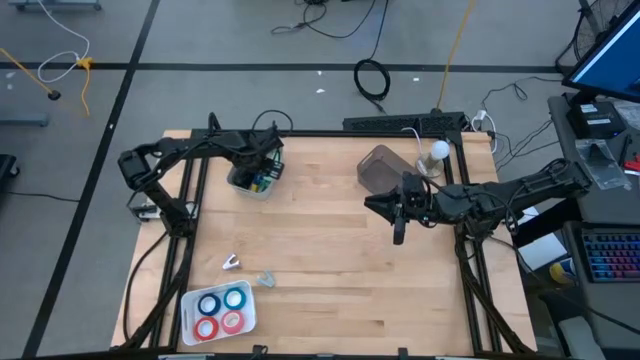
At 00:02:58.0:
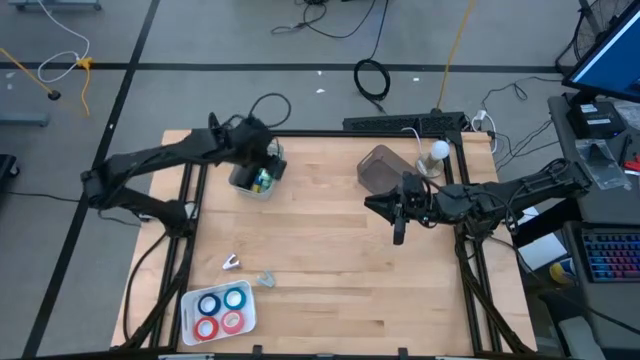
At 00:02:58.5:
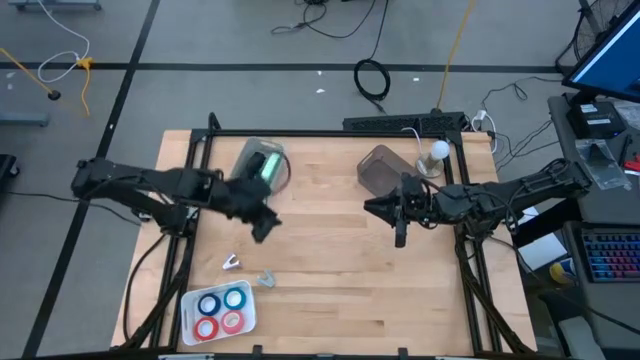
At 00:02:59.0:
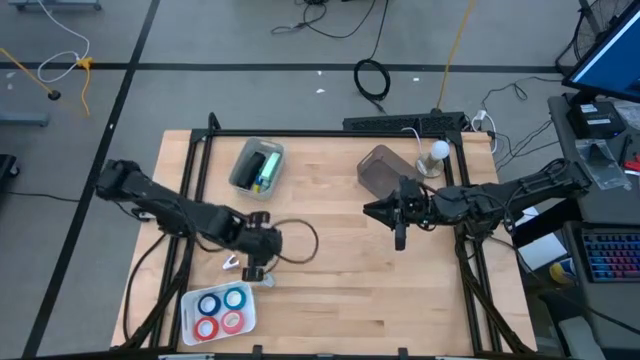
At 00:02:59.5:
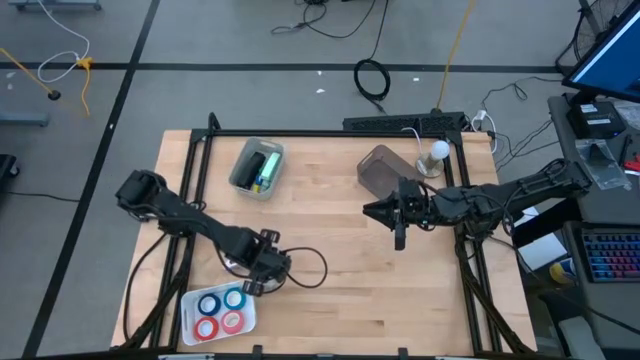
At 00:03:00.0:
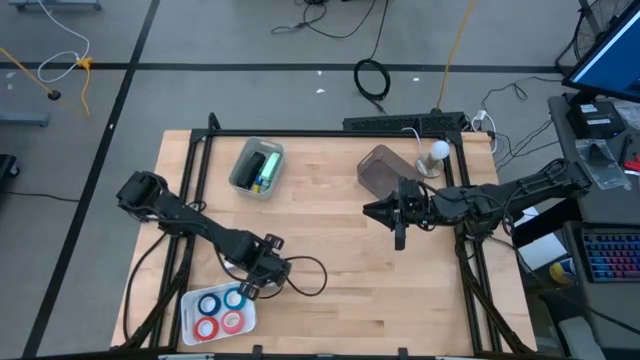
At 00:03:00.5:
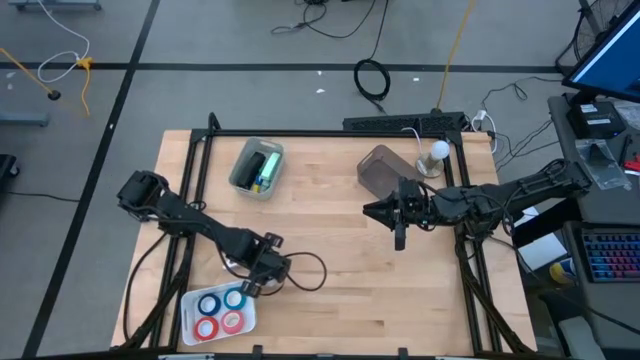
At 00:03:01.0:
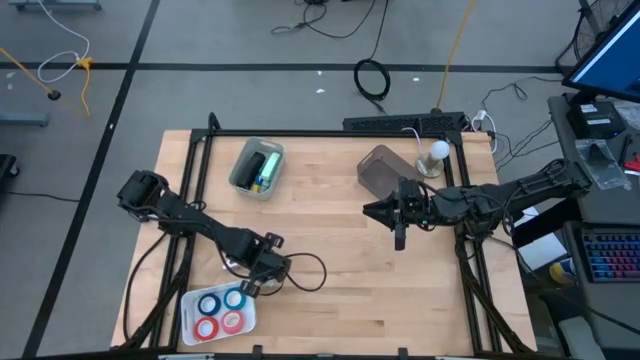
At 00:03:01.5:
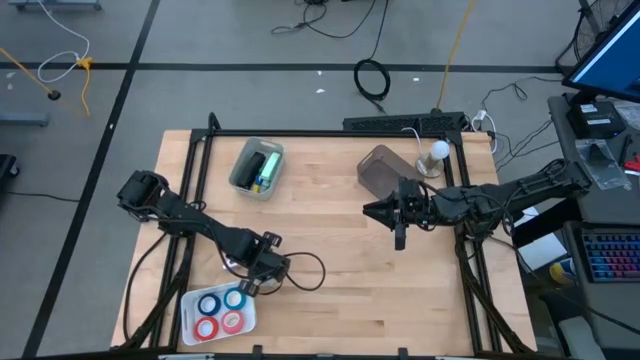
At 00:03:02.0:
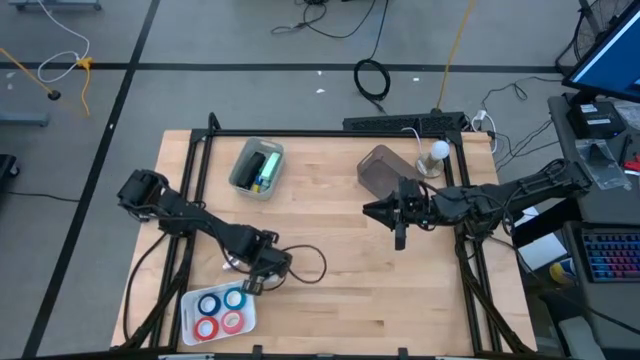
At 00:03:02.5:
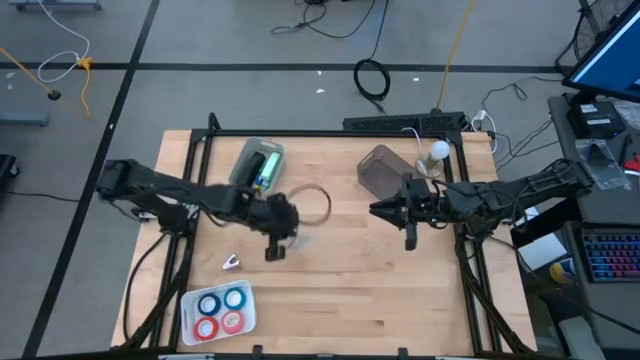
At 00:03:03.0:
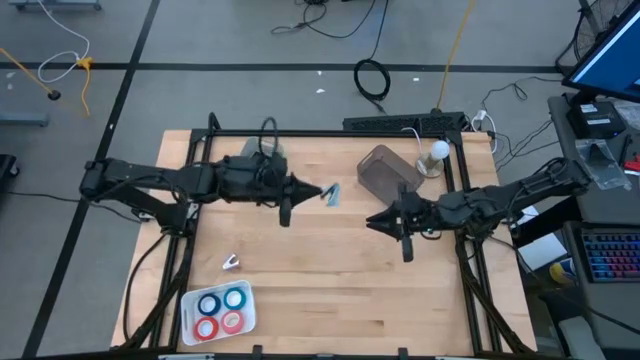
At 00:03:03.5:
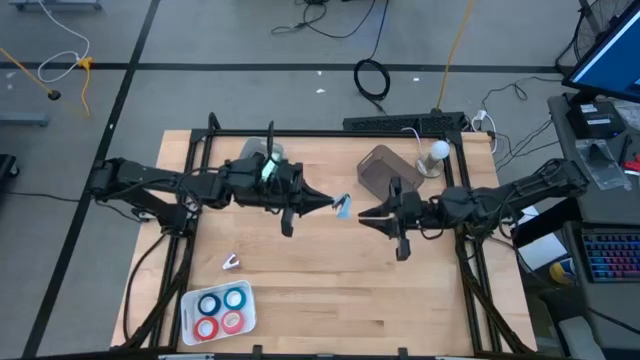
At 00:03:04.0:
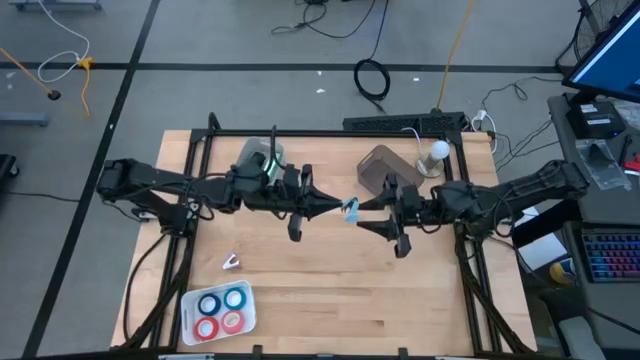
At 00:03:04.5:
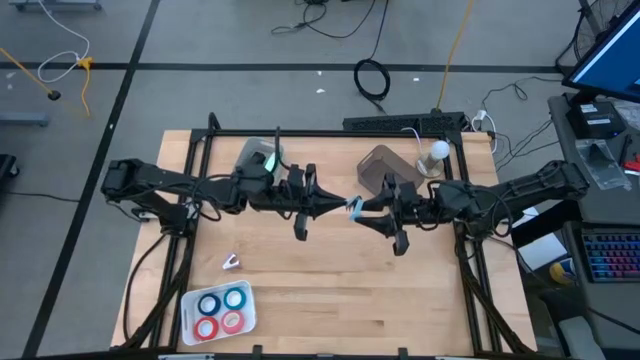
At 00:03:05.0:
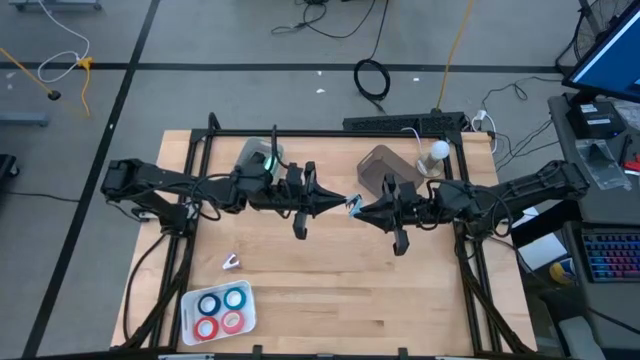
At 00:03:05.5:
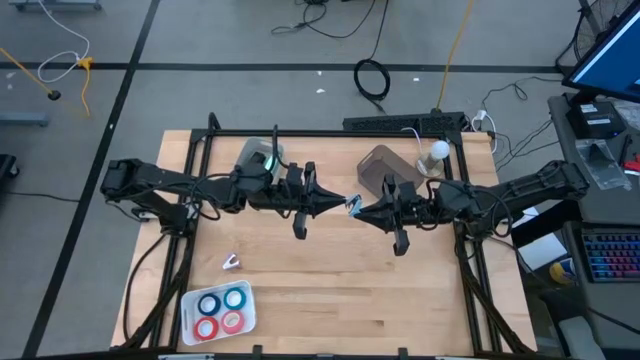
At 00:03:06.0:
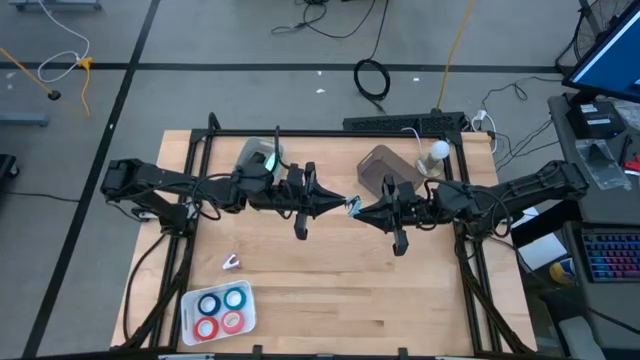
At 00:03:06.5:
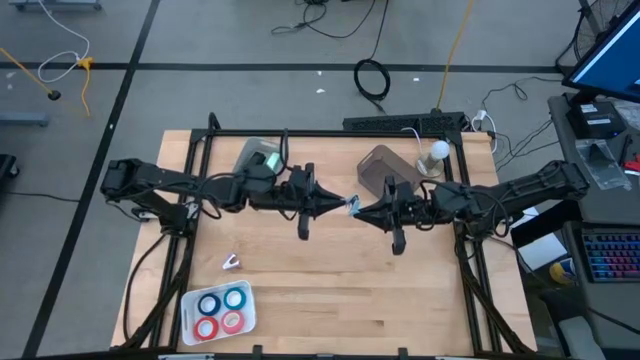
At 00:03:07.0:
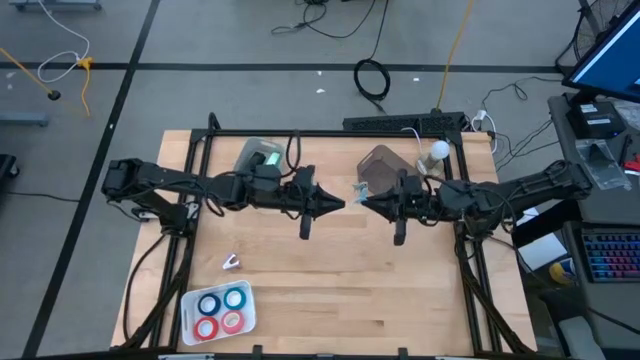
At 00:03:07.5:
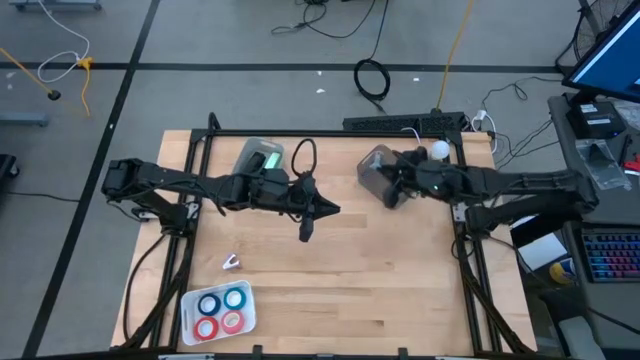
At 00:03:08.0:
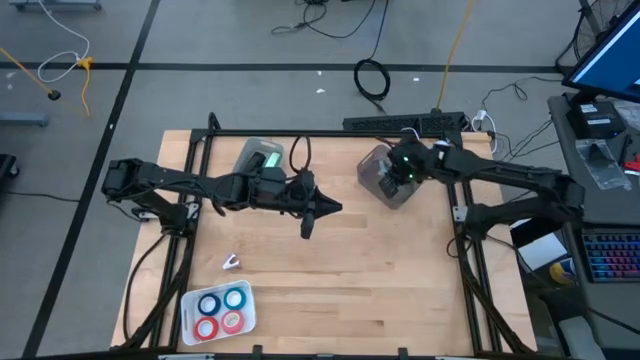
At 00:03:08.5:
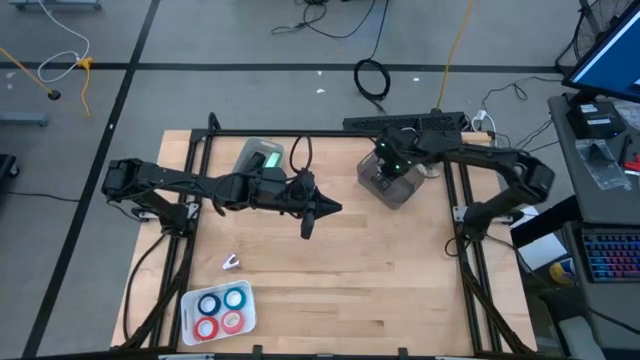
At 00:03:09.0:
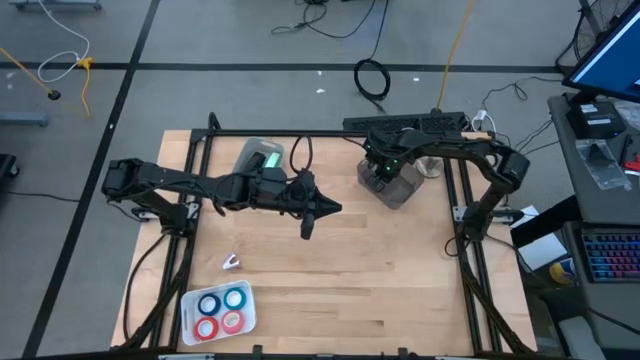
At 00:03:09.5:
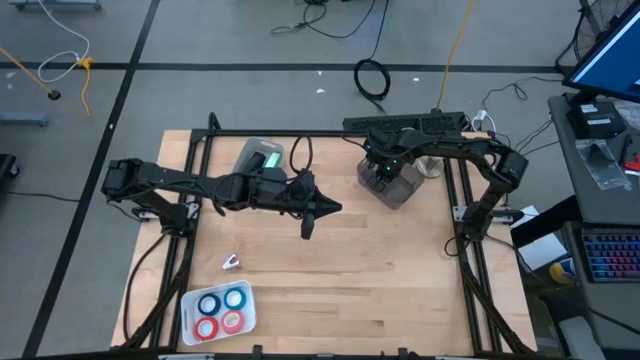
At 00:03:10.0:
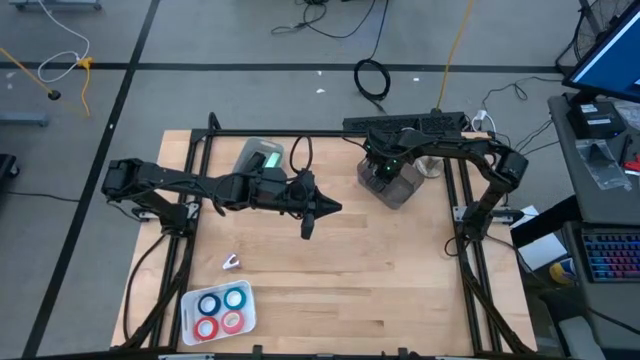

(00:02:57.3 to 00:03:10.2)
Task: Pick and place Stapler, Stapler remover, tape
Put the light blue stapler remover into the black bin

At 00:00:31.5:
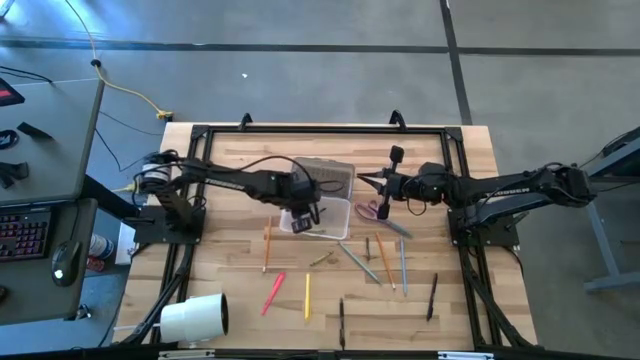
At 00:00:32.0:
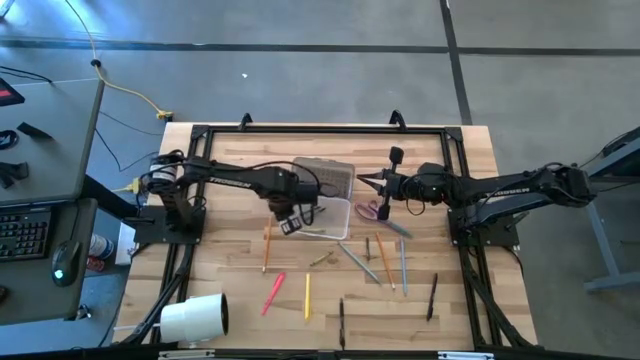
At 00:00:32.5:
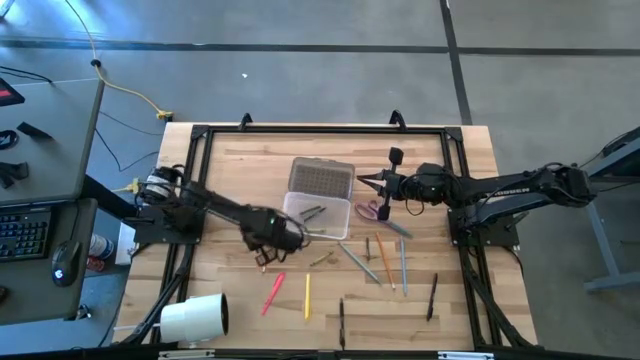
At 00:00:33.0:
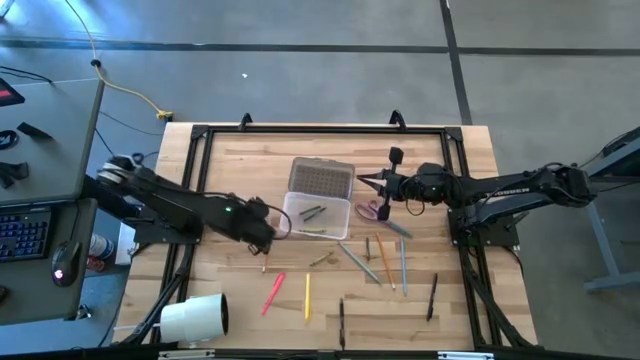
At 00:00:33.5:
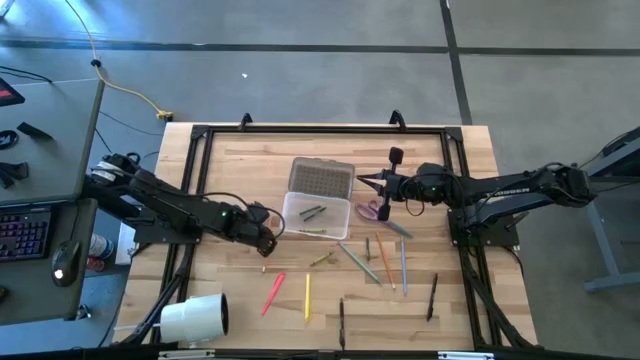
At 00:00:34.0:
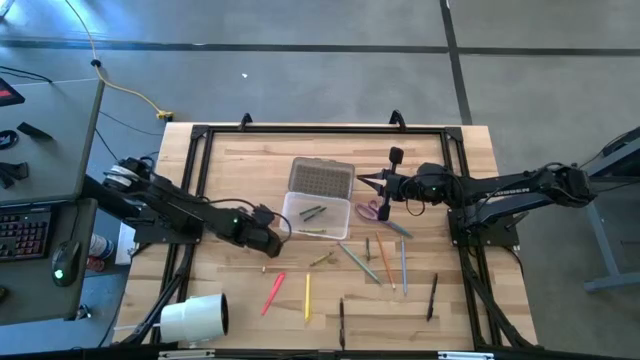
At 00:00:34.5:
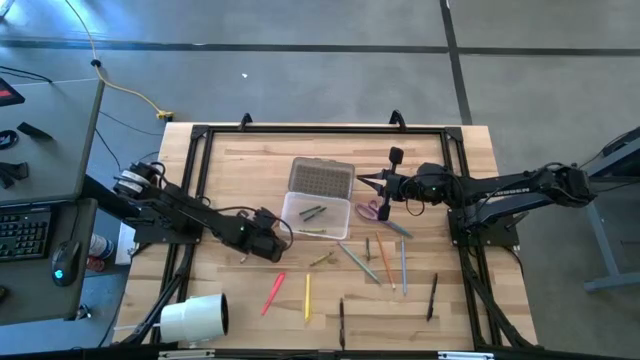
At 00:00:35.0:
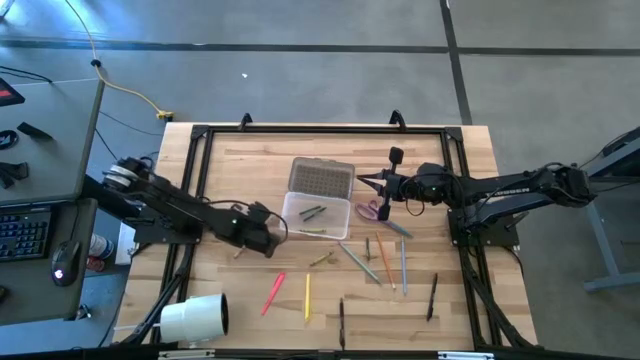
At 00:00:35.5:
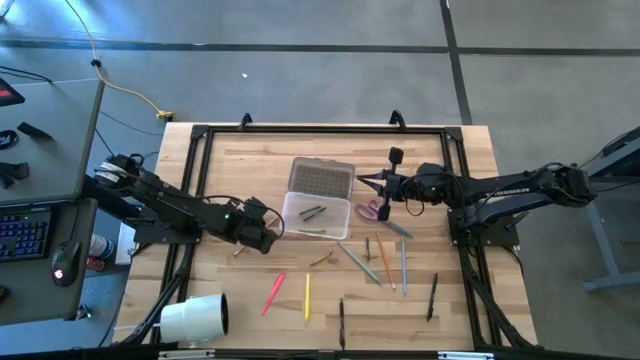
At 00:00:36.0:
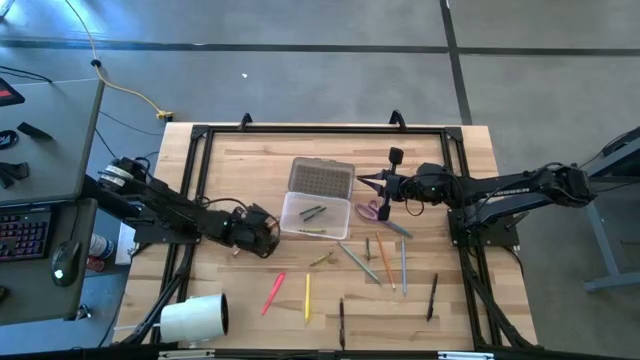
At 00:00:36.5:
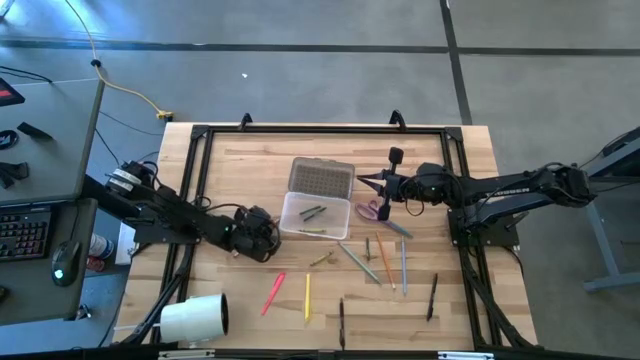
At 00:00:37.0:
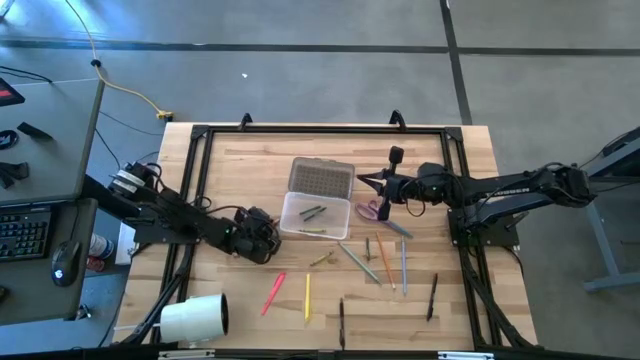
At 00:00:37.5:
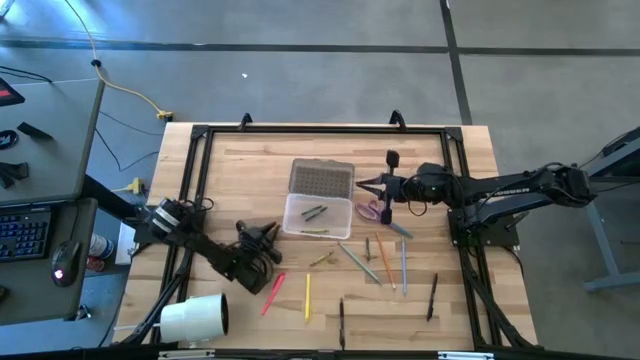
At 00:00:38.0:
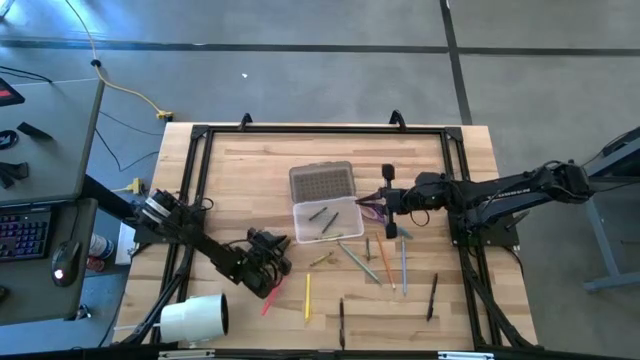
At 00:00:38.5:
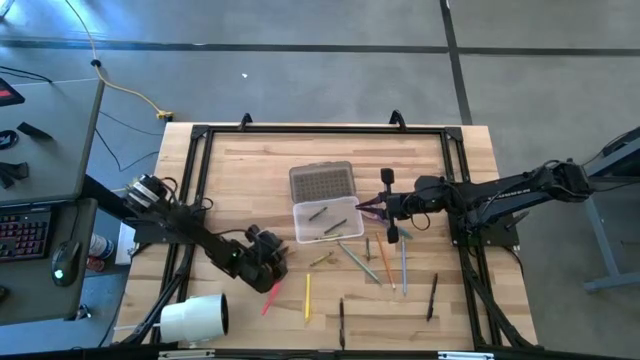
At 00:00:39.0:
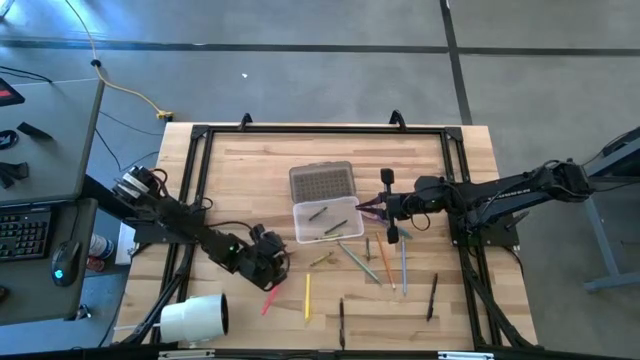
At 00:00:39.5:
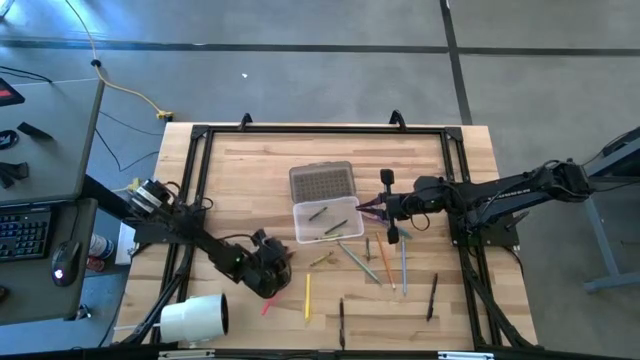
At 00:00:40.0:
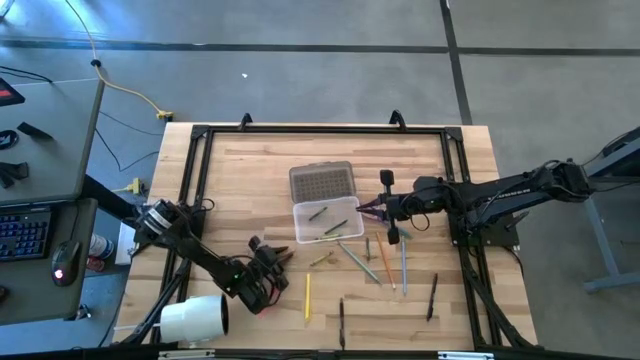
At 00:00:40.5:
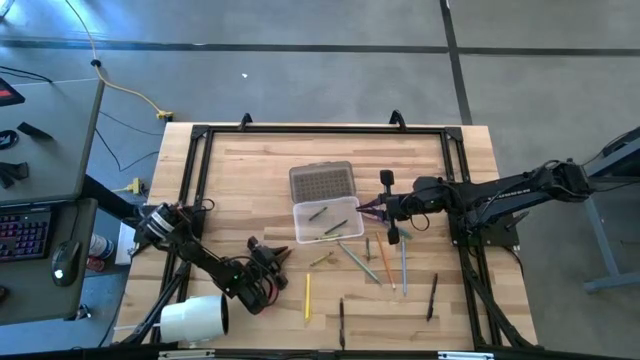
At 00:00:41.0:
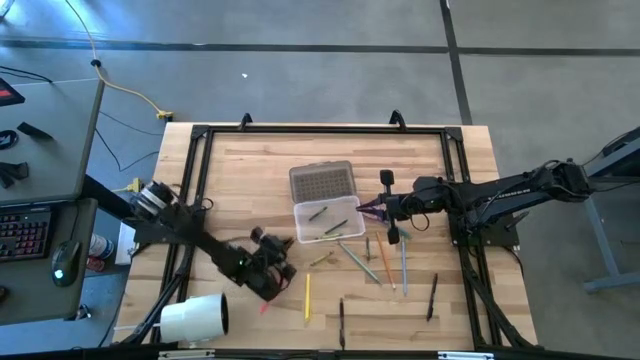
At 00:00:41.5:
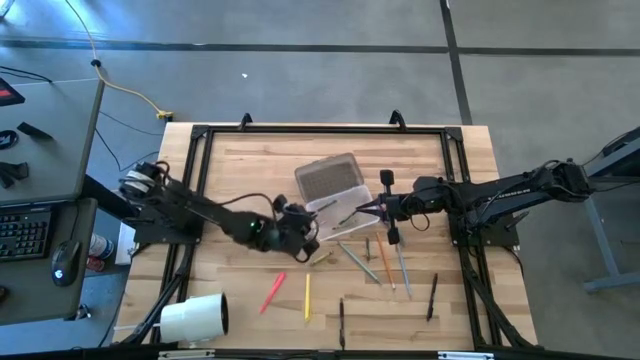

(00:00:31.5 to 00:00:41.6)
Task: Pick & place school supplies into a supply box
Put the orange pencil into the black supply box
